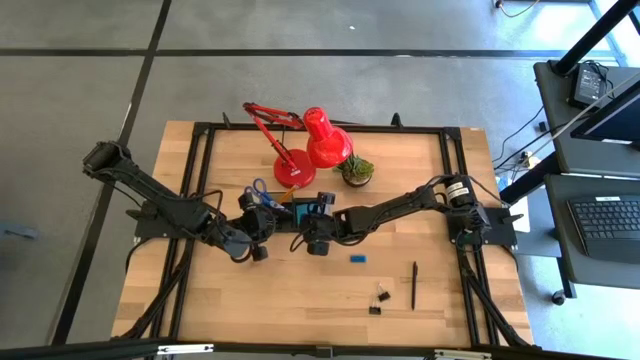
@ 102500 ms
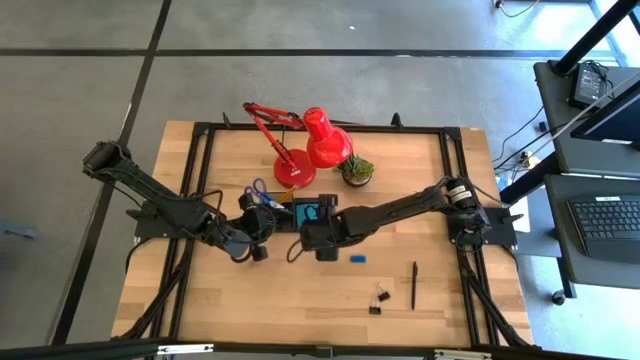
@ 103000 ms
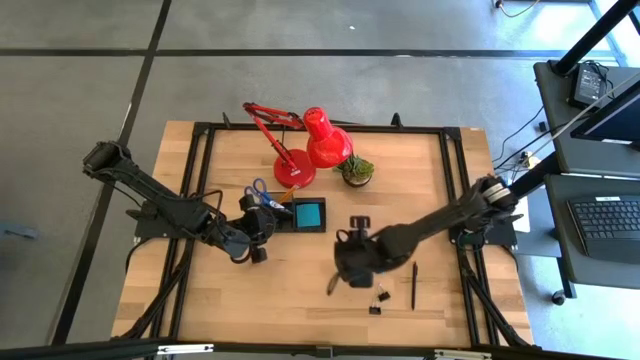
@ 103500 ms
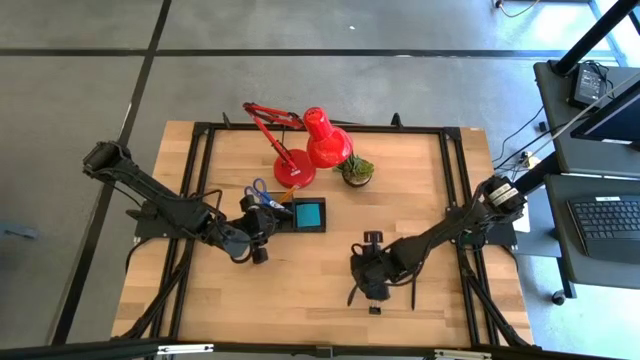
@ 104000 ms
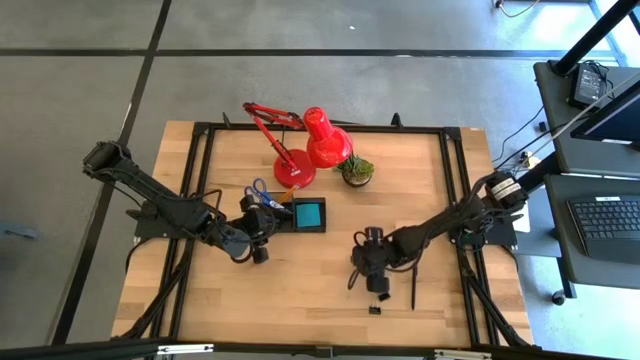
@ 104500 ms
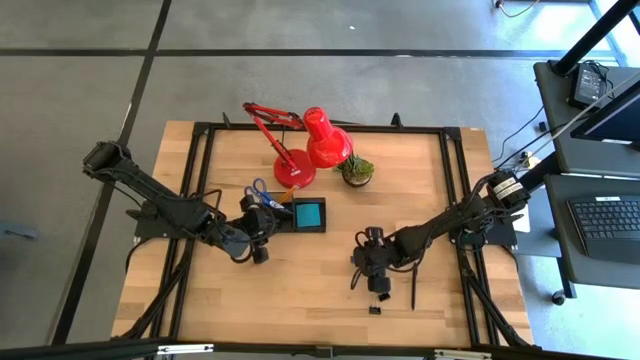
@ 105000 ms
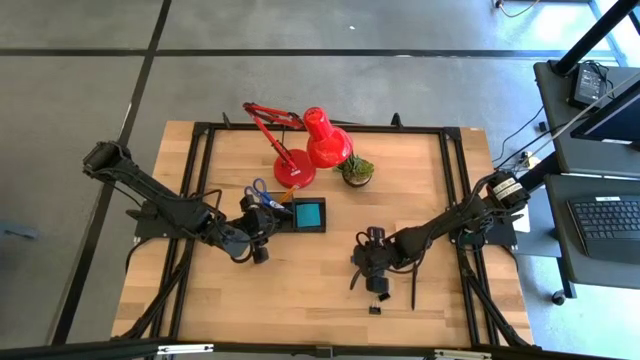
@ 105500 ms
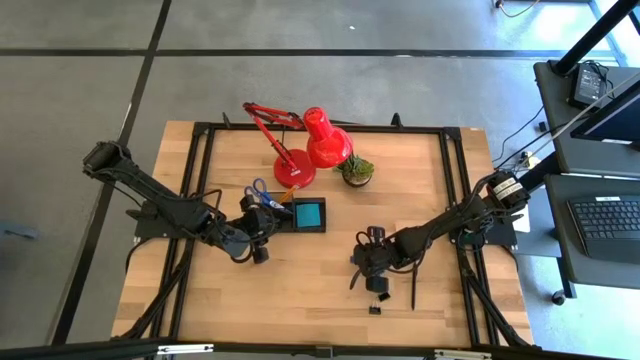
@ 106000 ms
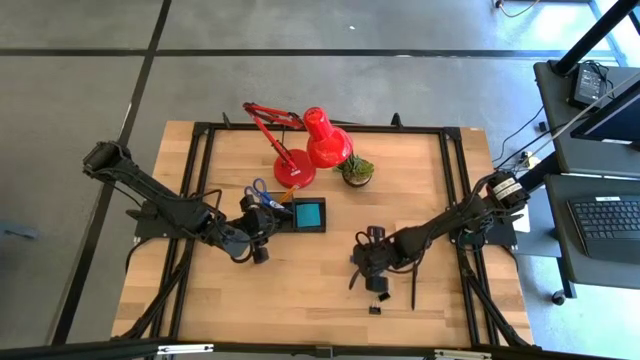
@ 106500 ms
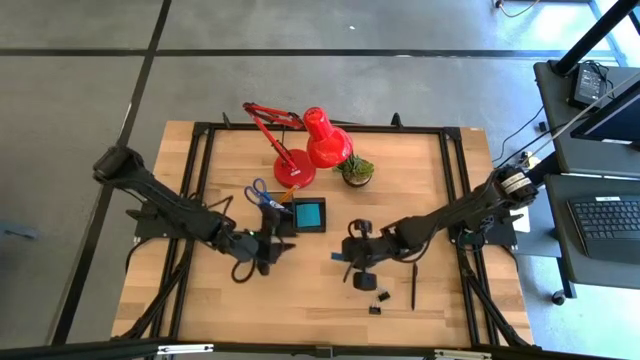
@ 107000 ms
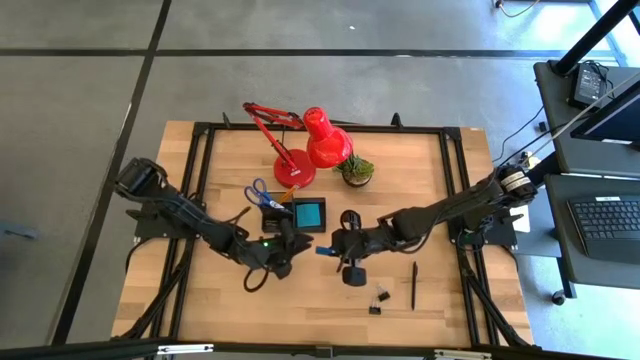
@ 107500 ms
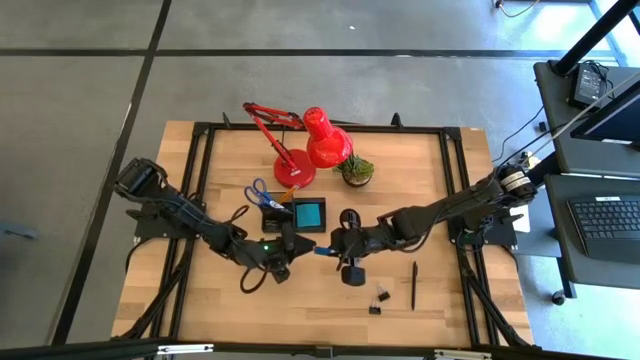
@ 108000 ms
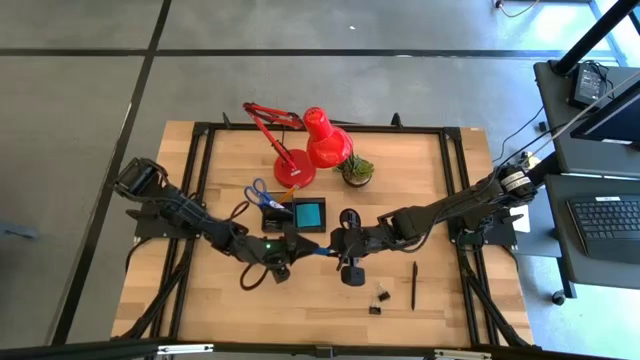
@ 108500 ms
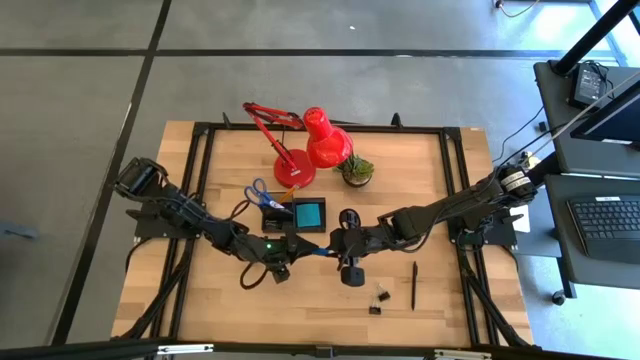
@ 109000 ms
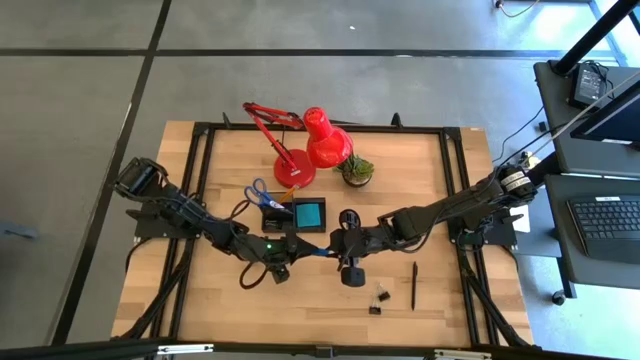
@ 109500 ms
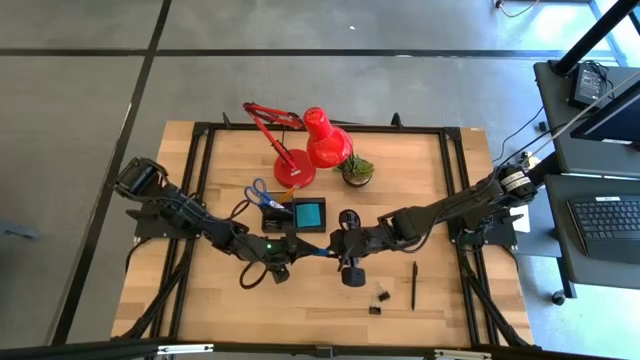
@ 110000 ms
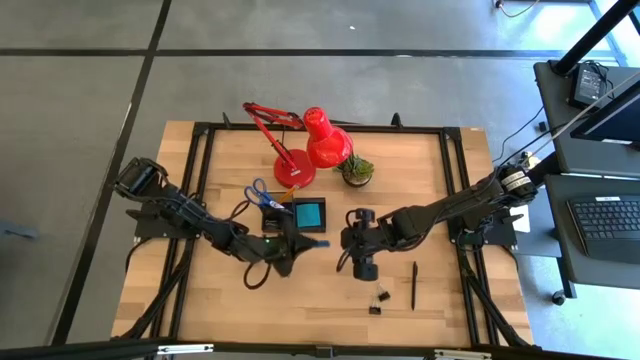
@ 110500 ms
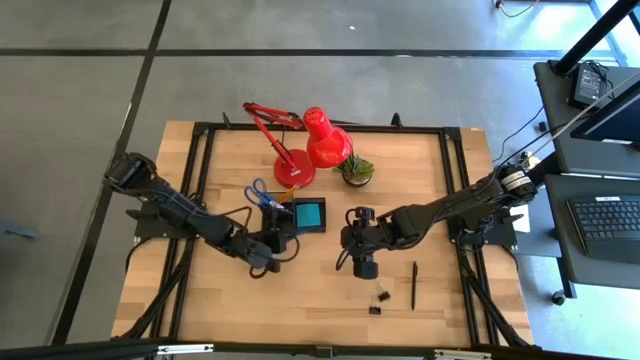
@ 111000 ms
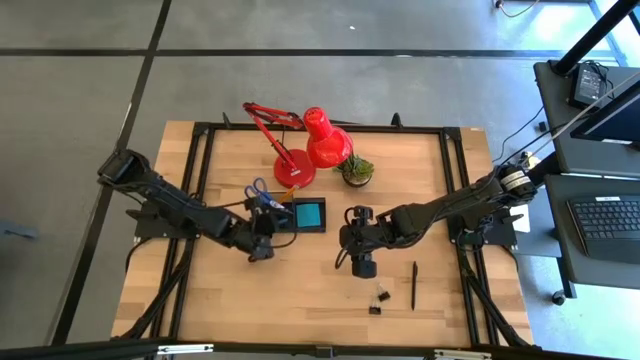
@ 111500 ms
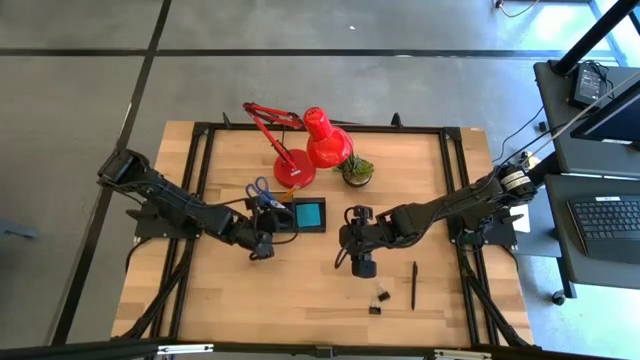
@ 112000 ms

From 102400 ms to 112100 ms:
Task: Pick and place office supplies into organizer
Put the blue eraser into the black desk organizer

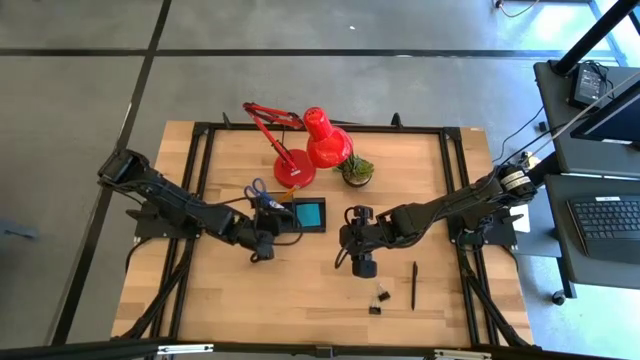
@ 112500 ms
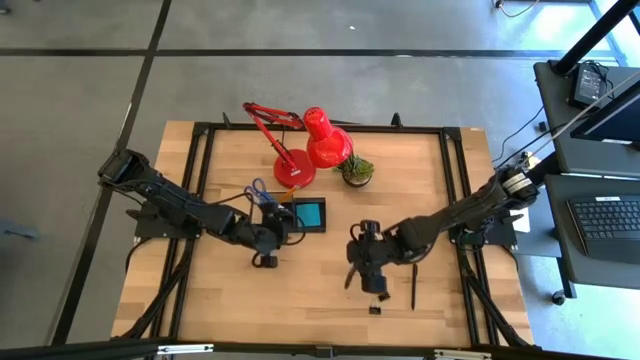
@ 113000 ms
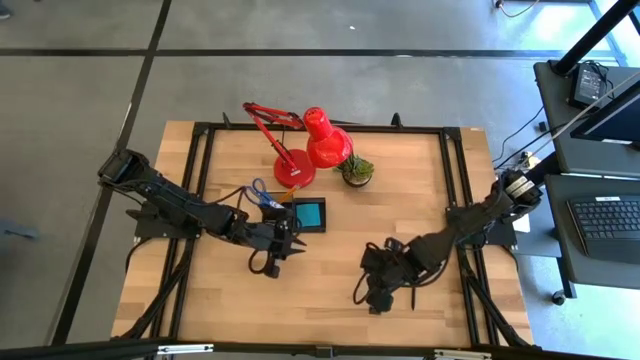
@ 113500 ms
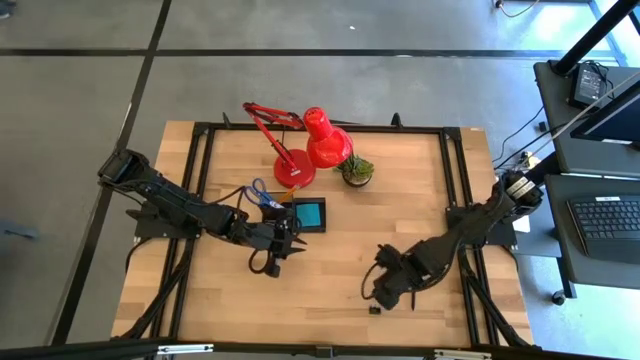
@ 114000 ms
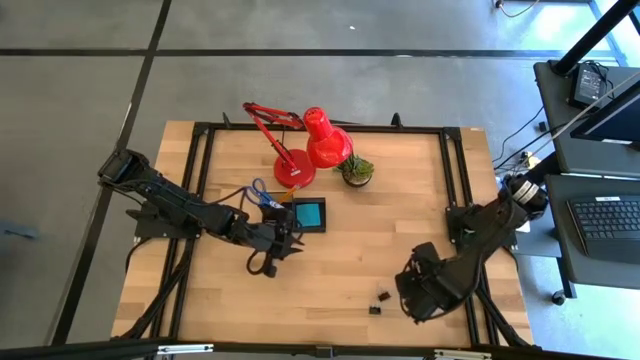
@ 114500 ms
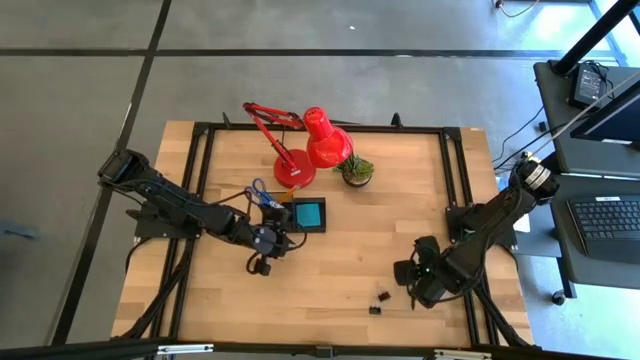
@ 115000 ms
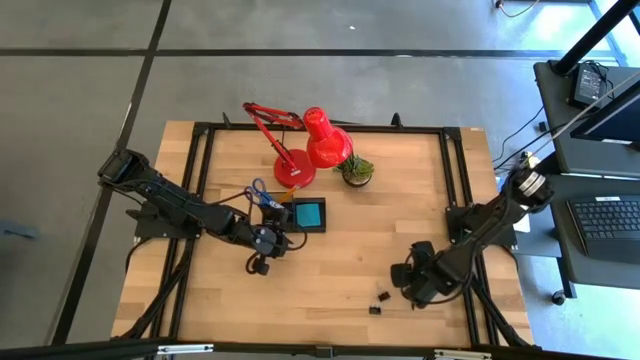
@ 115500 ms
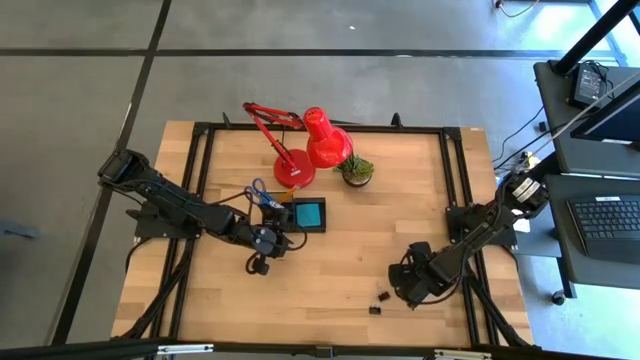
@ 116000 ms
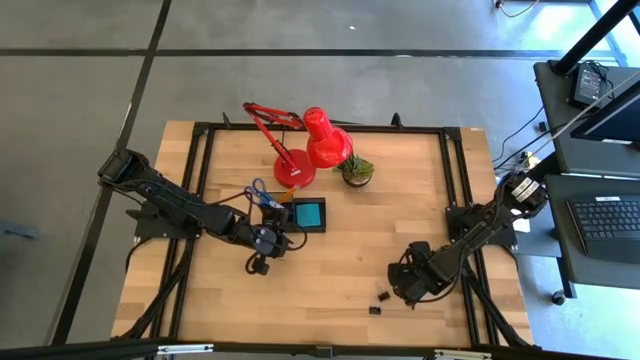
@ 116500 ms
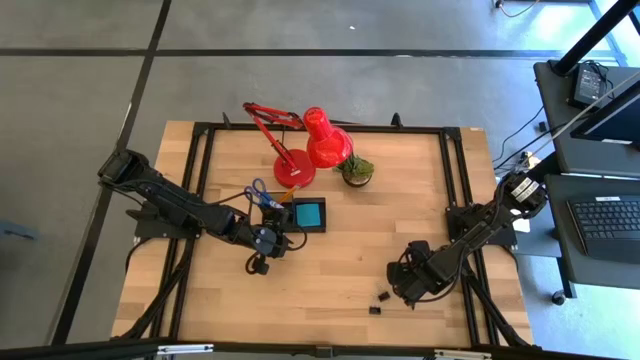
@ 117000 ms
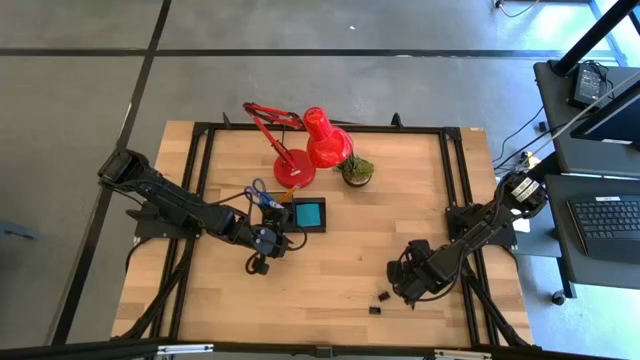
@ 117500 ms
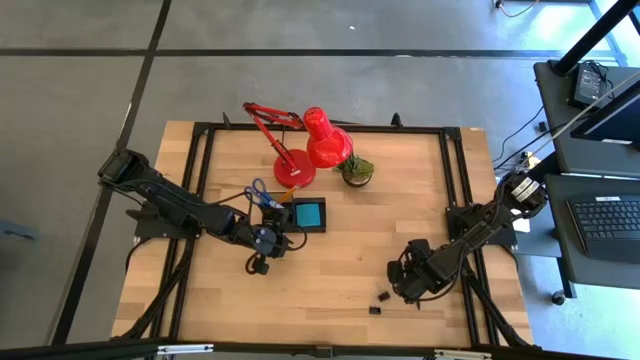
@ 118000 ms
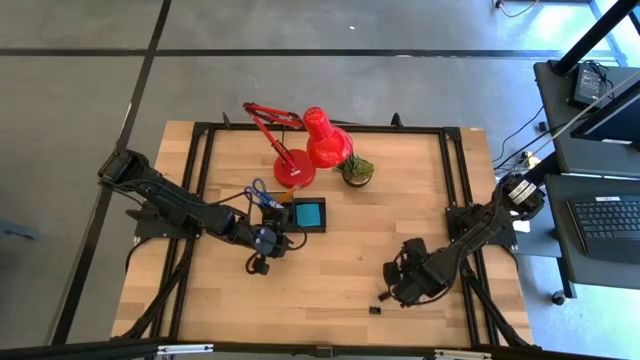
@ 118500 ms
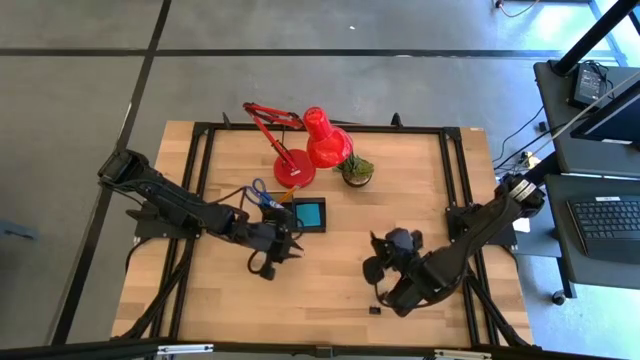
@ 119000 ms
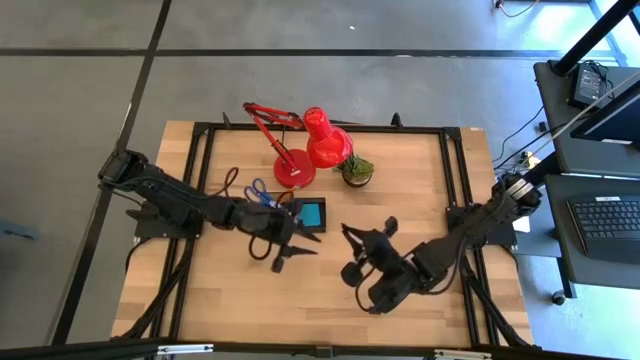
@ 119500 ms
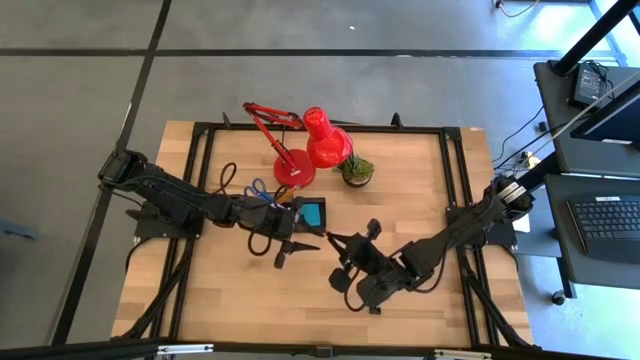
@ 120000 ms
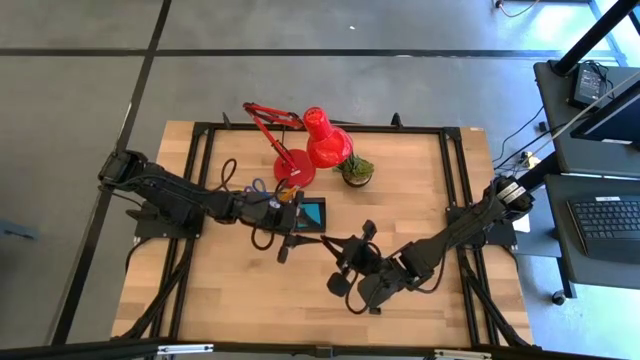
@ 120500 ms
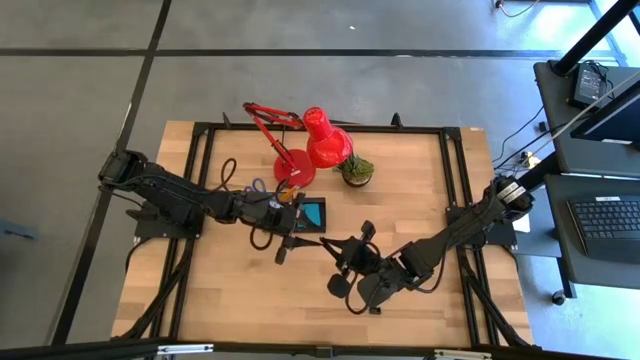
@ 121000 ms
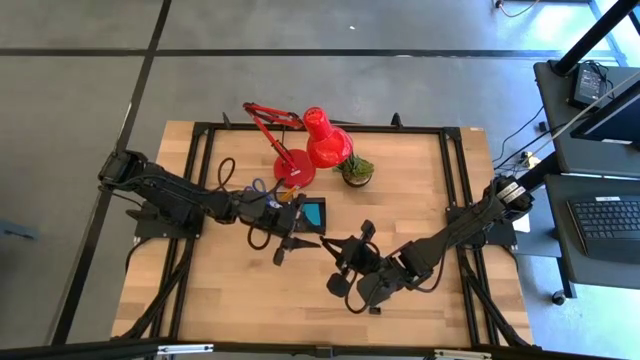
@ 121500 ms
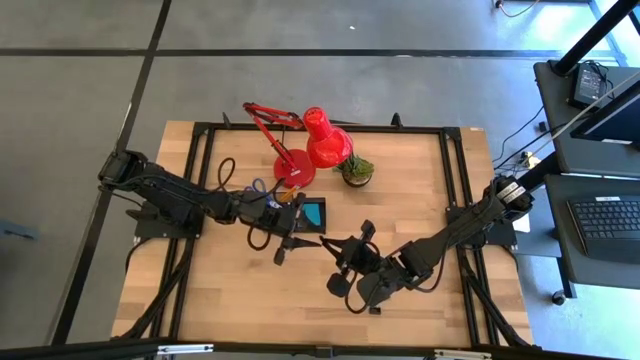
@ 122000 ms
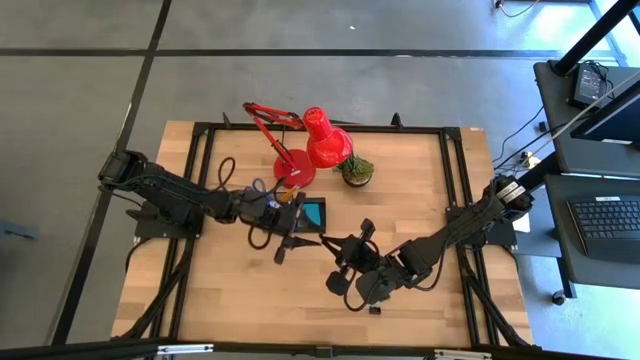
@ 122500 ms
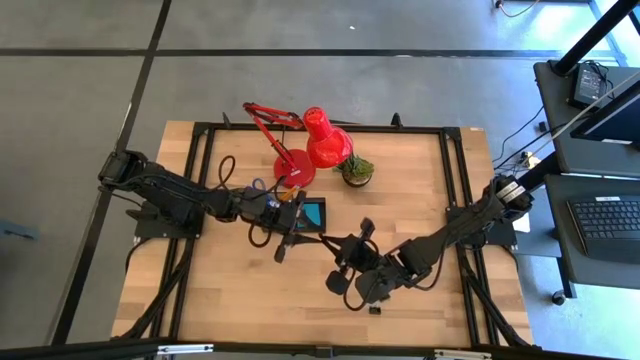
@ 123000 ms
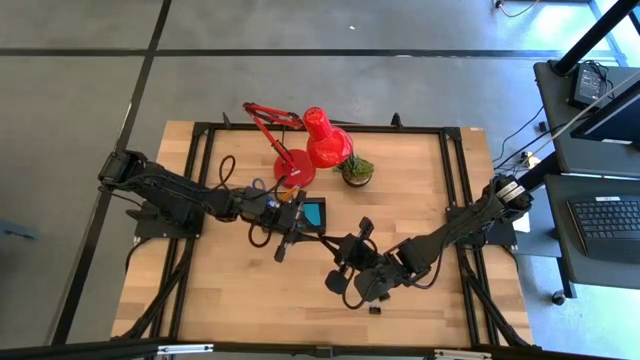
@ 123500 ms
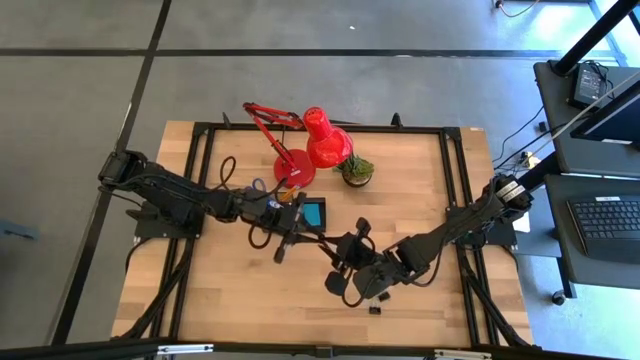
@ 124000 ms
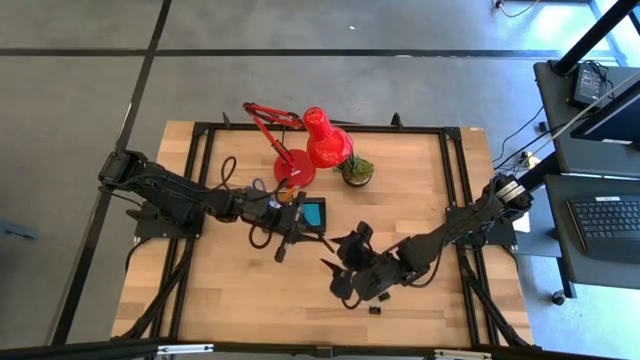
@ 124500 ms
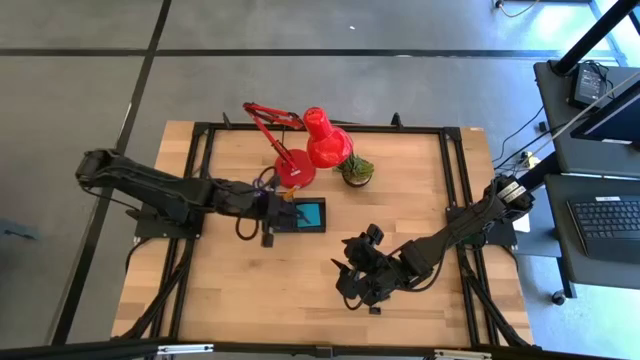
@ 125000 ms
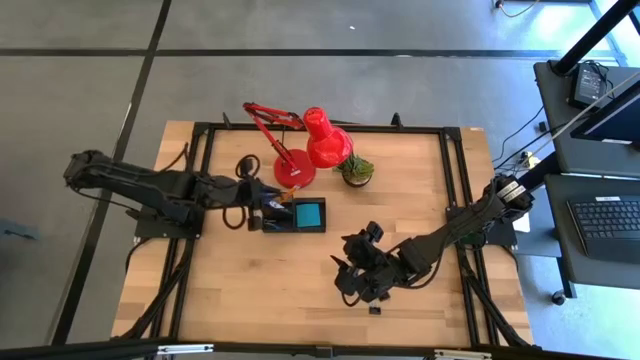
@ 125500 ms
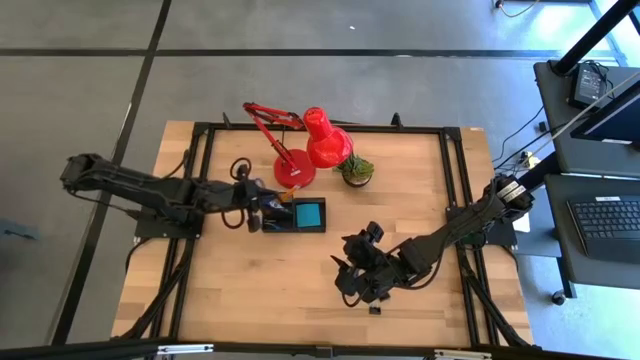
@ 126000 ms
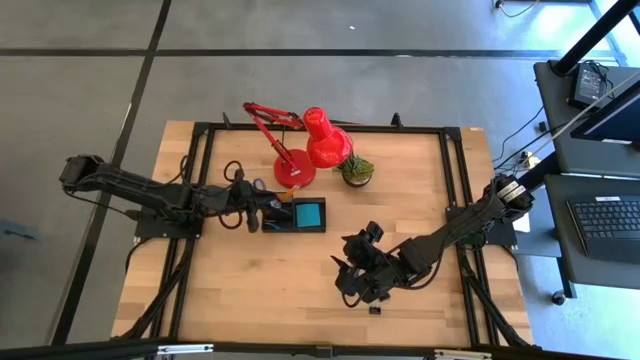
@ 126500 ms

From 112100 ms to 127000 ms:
Put the black pen into the black desk organizer
